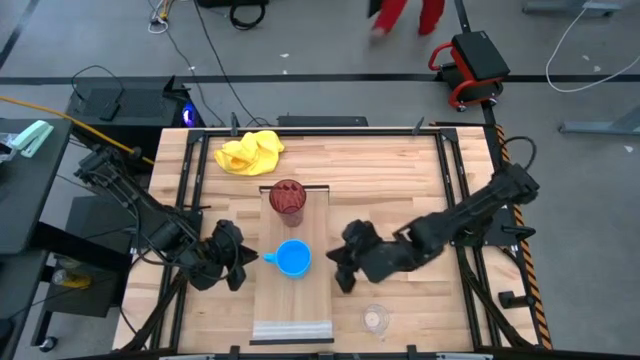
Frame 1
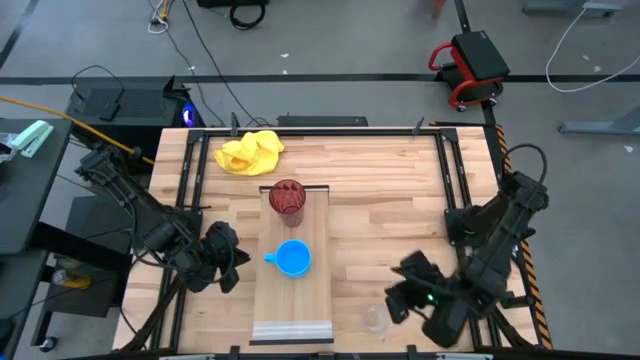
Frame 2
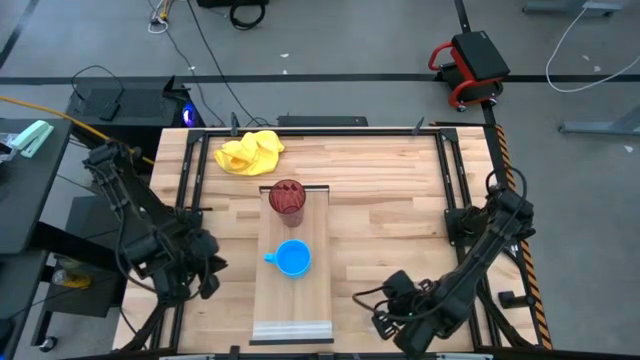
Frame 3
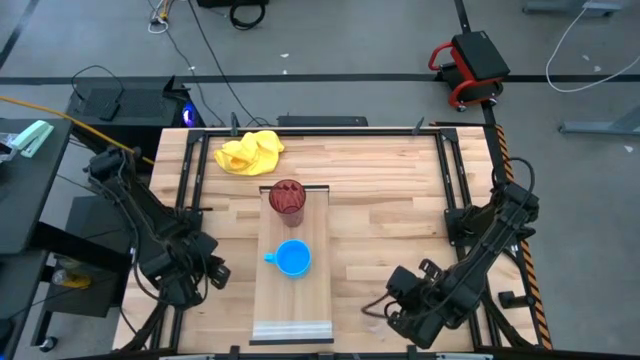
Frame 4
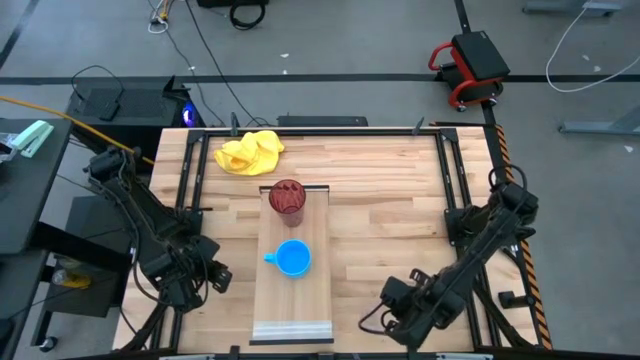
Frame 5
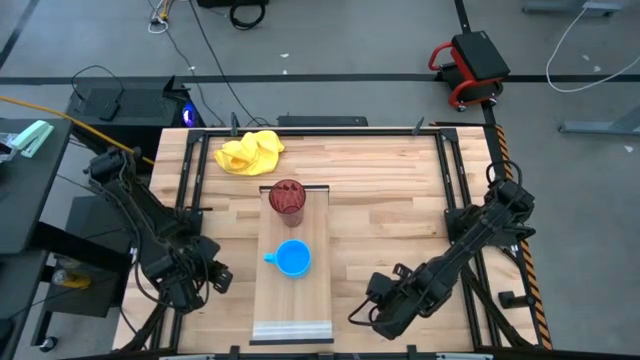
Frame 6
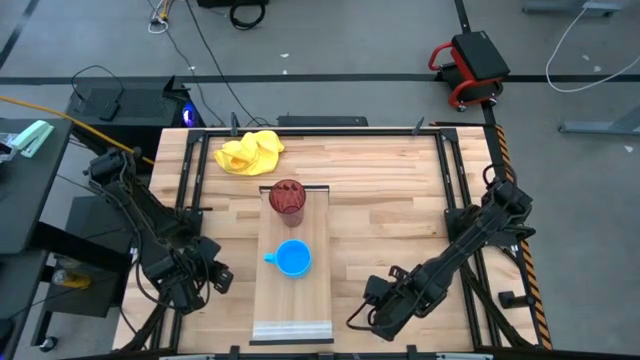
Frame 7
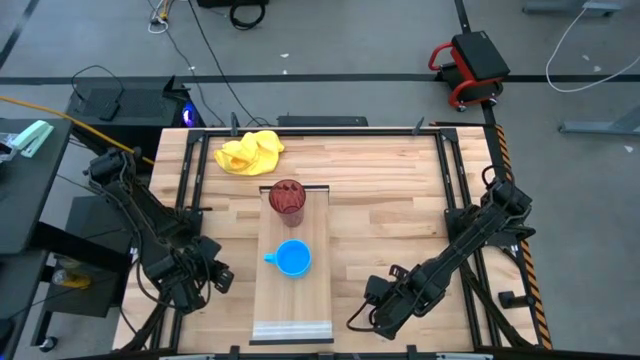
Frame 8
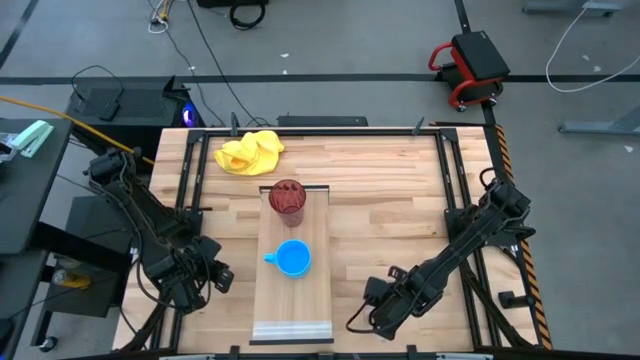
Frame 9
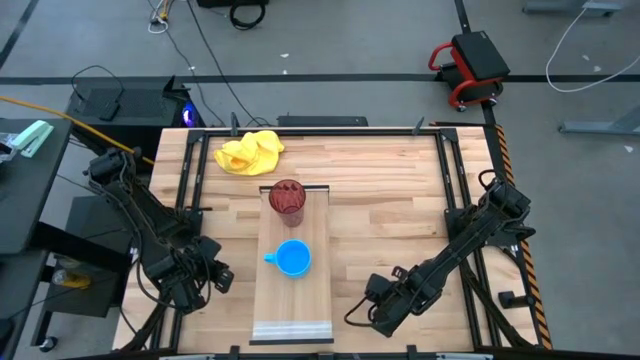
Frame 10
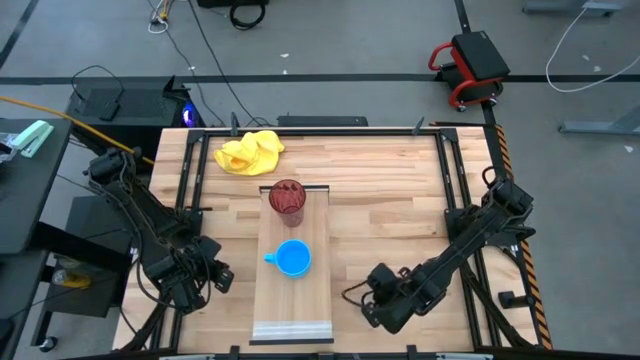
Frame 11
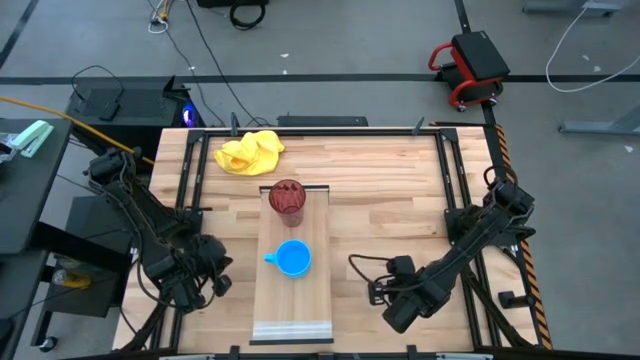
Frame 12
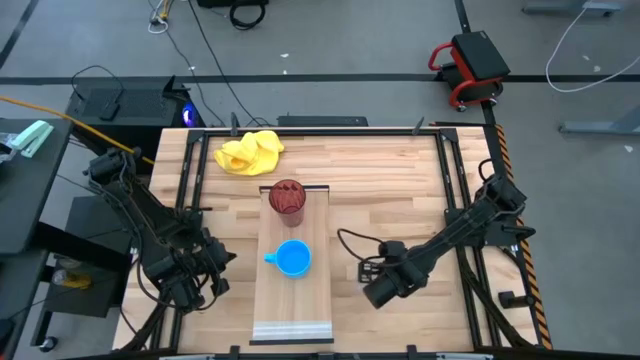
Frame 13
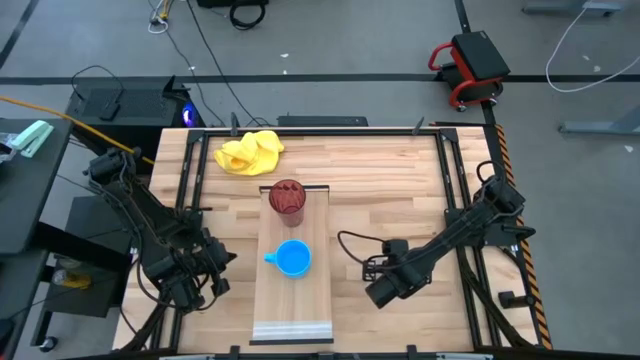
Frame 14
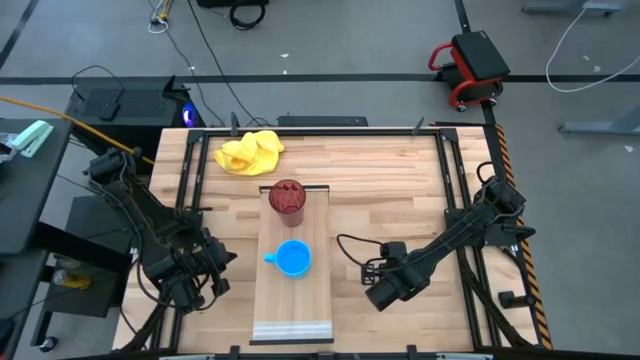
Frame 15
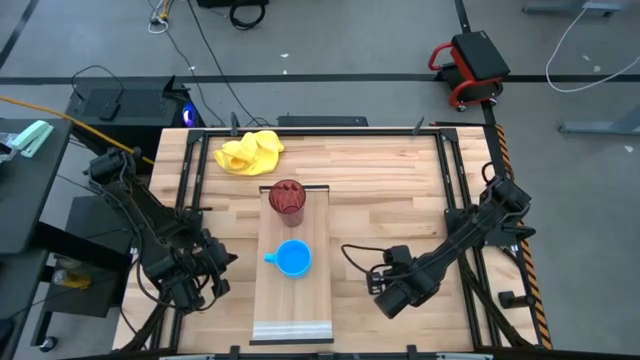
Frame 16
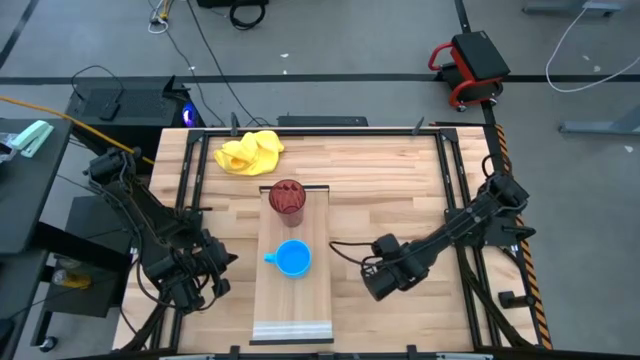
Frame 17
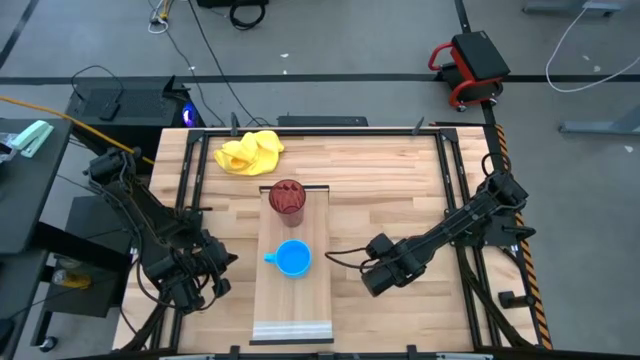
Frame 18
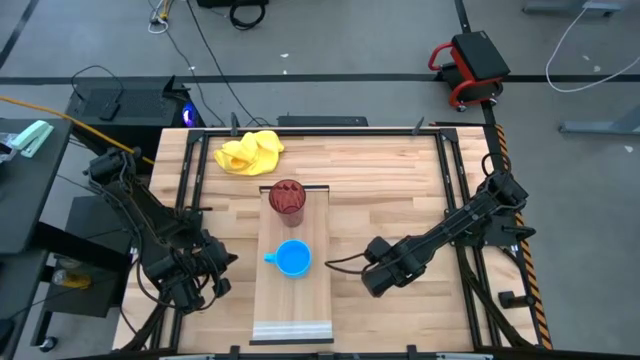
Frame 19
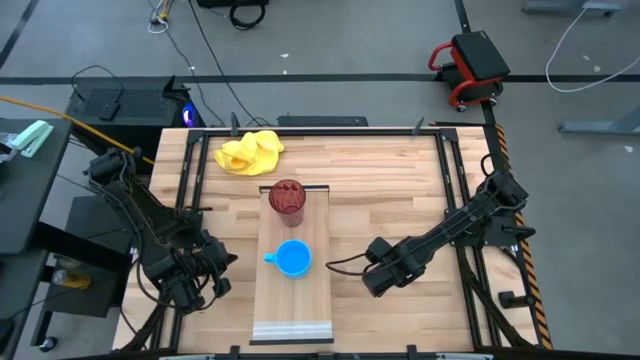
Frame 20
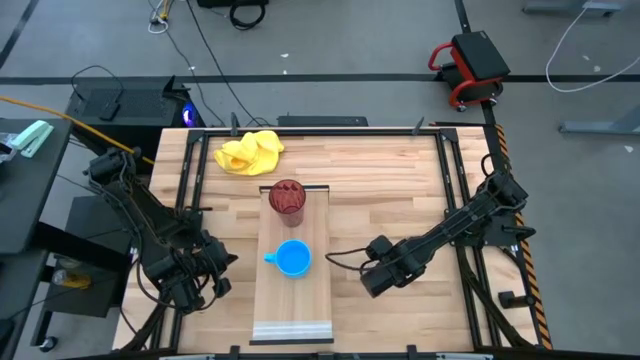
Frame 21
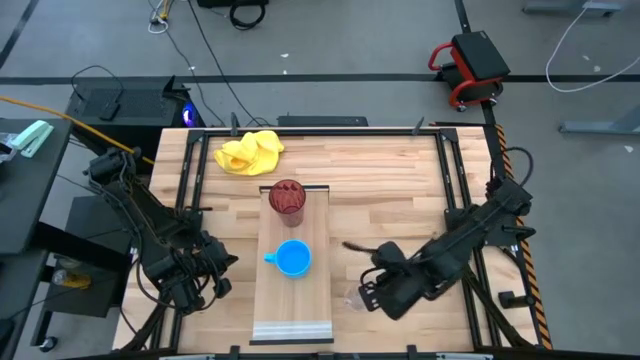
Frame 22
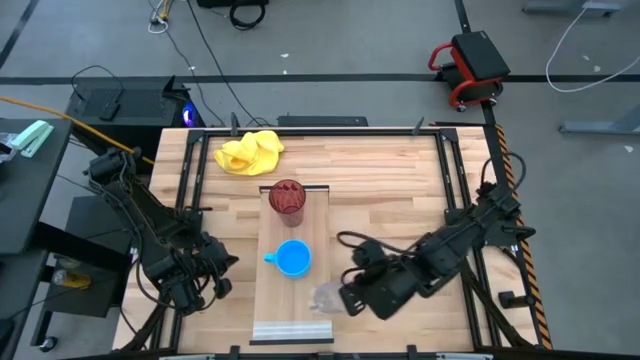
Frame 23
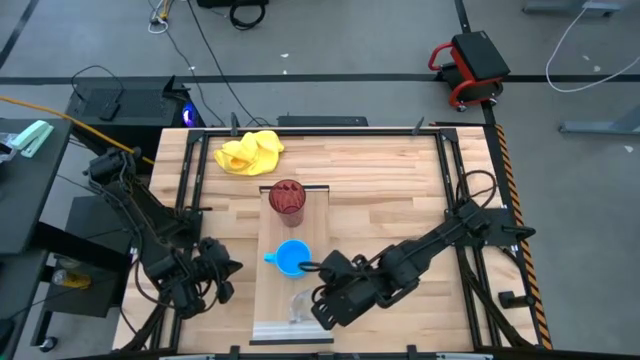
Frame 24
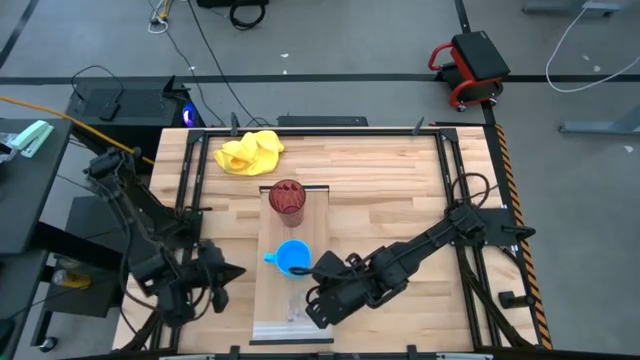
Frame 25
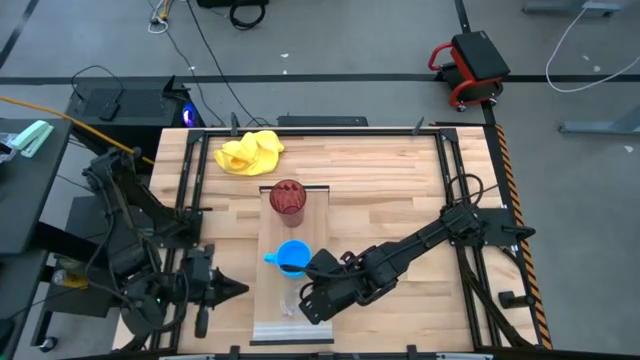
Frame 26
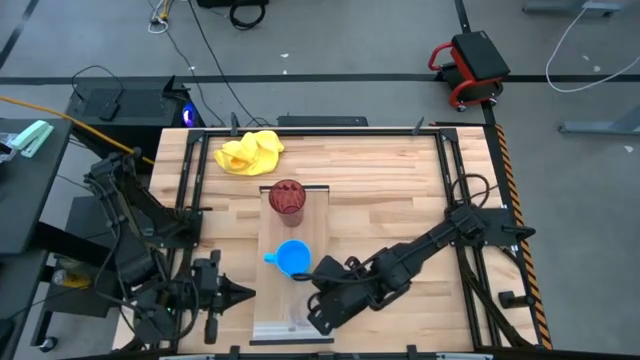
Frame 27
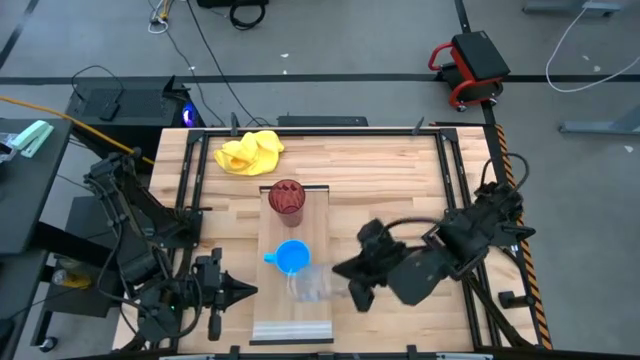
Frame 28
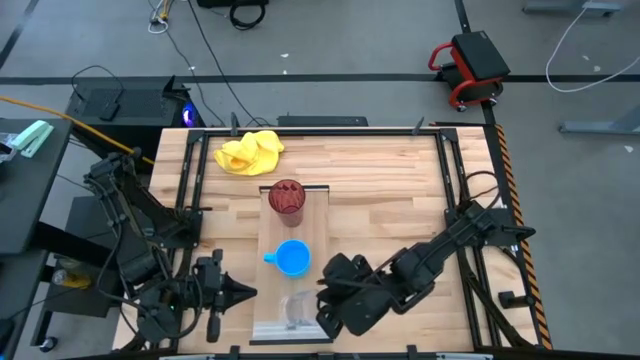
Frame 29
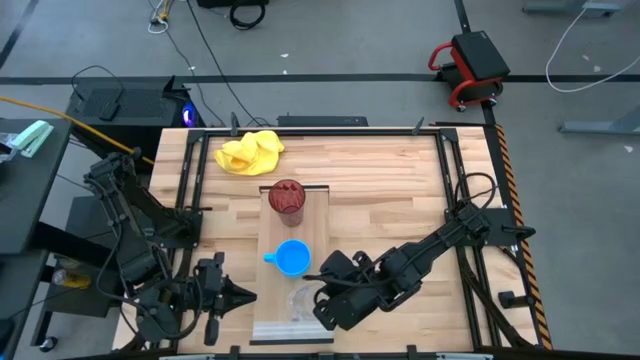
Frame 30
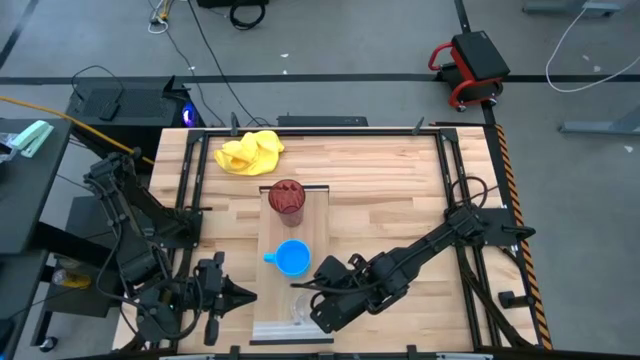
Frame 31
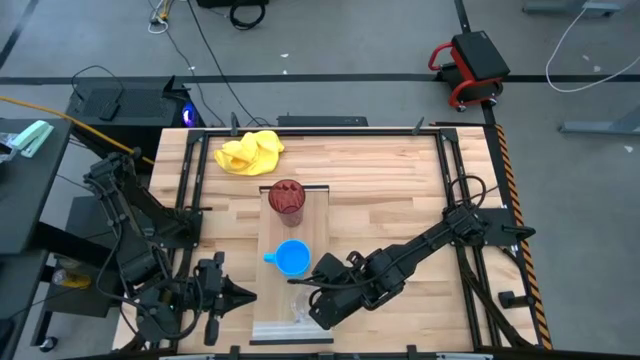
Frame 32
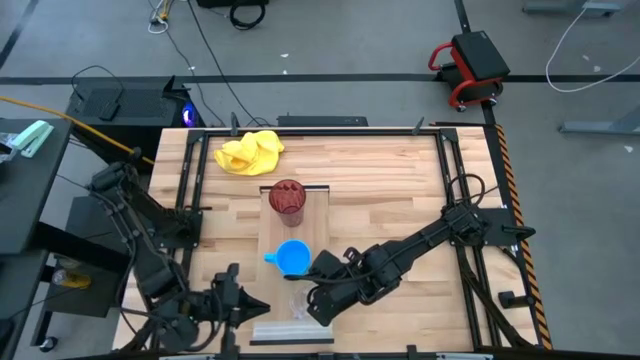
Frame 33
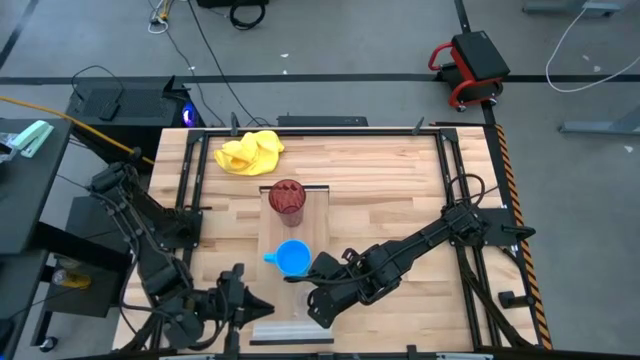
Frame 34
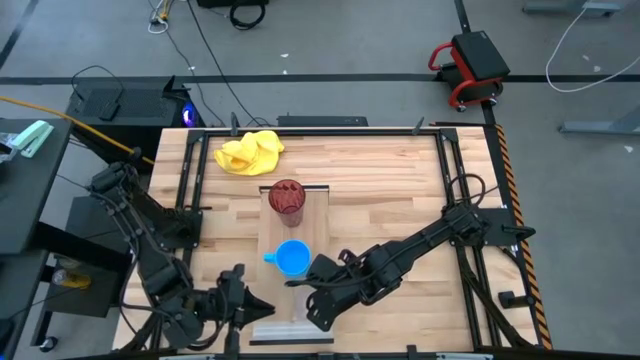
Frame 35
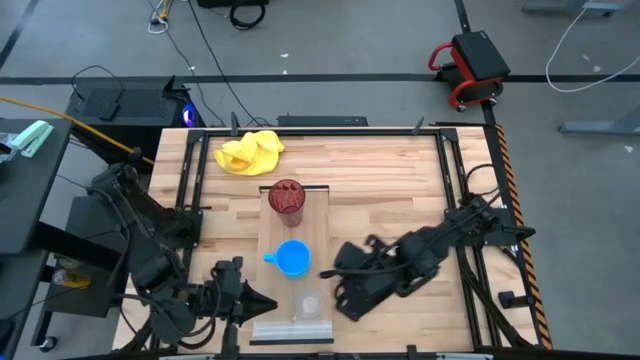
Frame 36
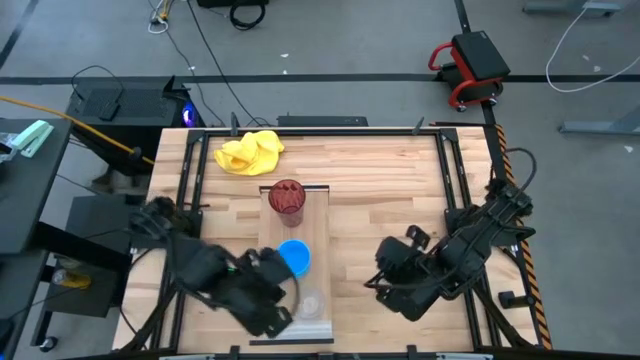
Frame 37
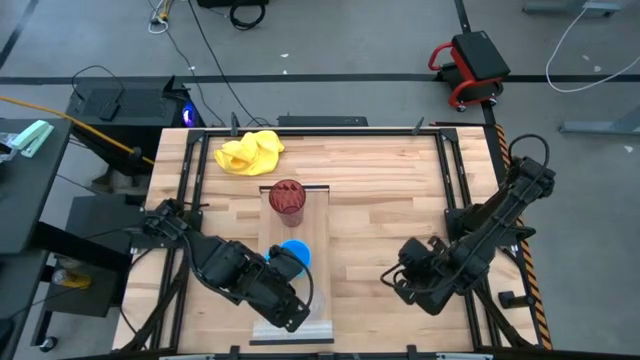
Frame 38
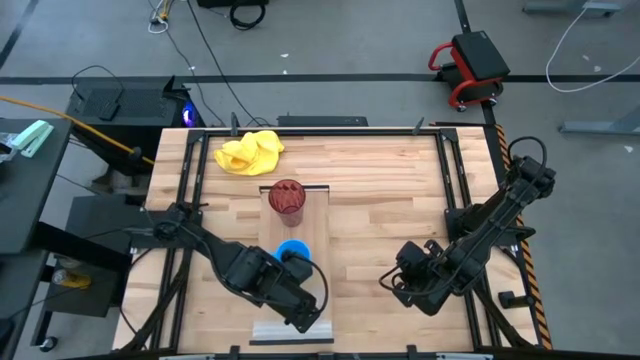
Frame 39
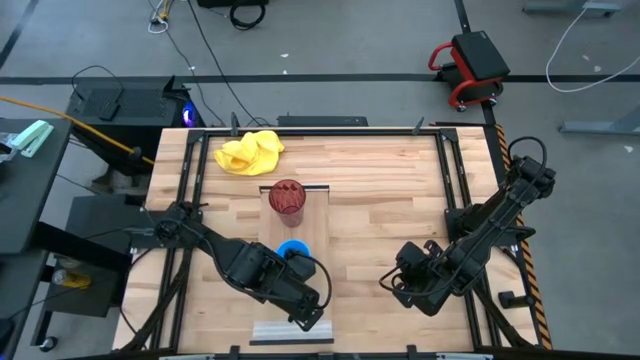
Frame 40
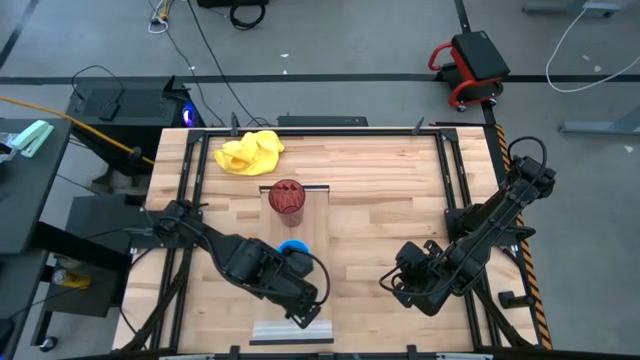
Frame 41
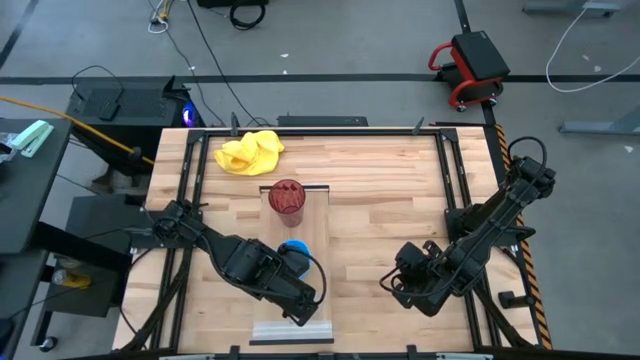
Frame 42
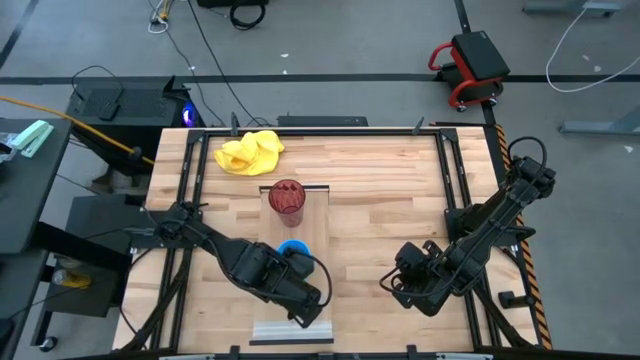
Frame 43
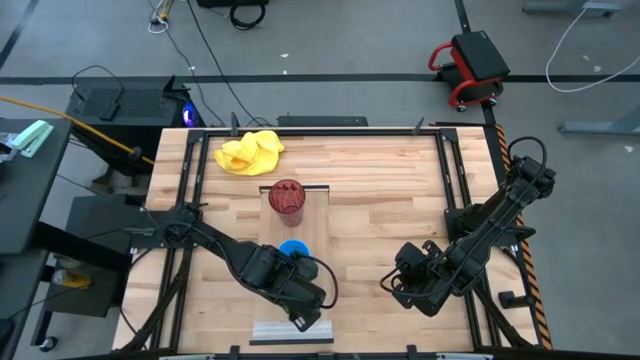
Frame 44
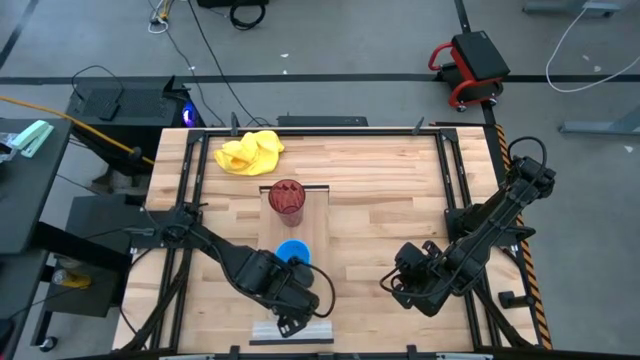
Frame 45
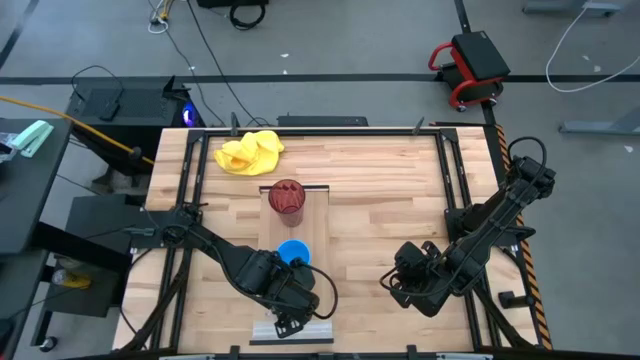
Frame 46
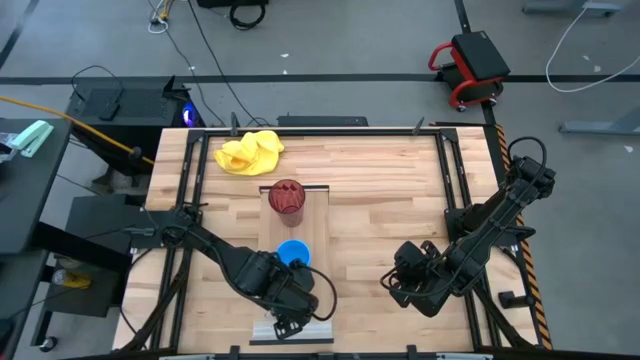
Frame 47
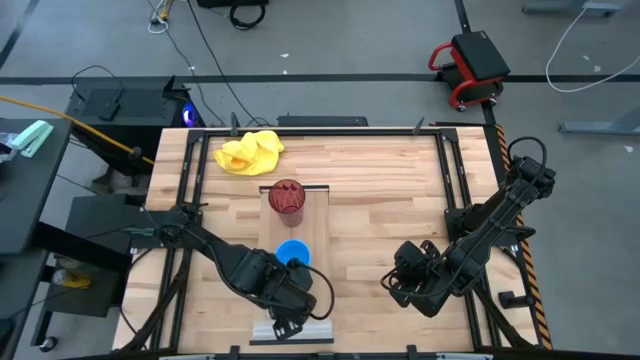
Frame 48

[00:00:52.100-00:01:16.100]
Task: Stack small to large cups/mugs on shelf
Put the transparent mug on the shelf
